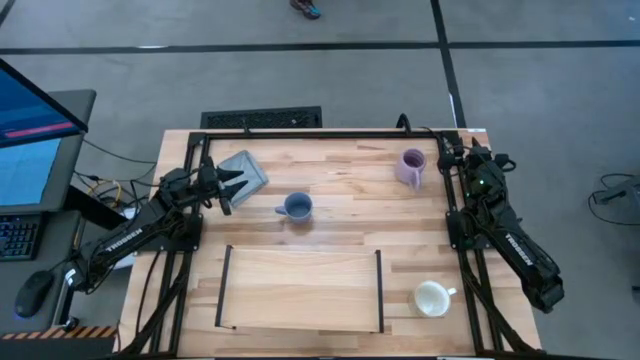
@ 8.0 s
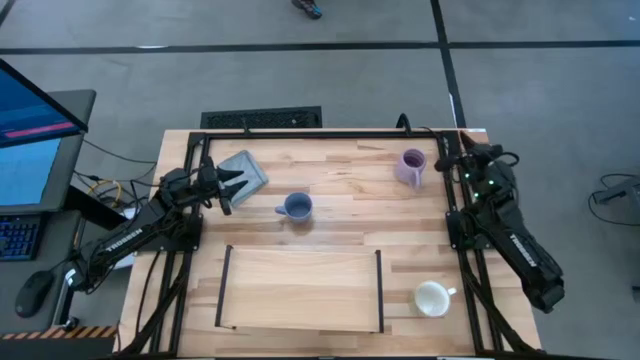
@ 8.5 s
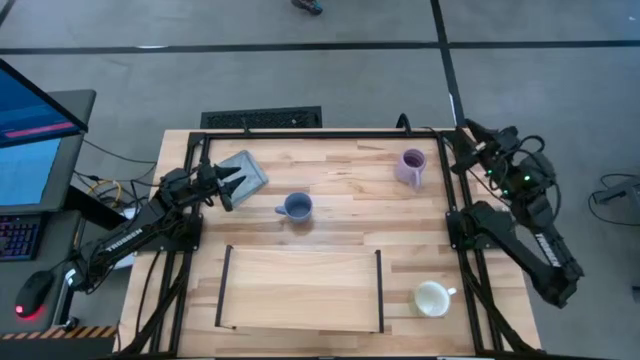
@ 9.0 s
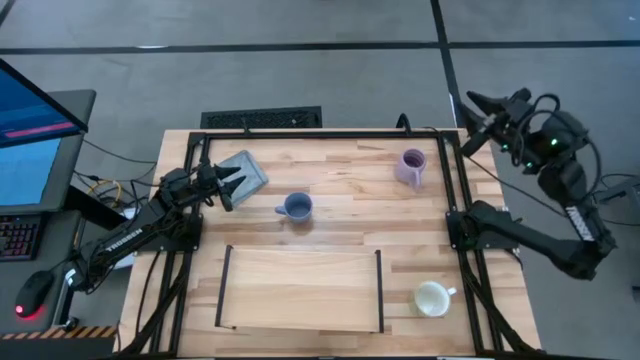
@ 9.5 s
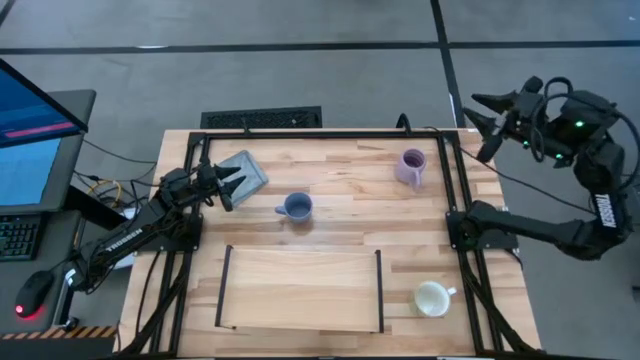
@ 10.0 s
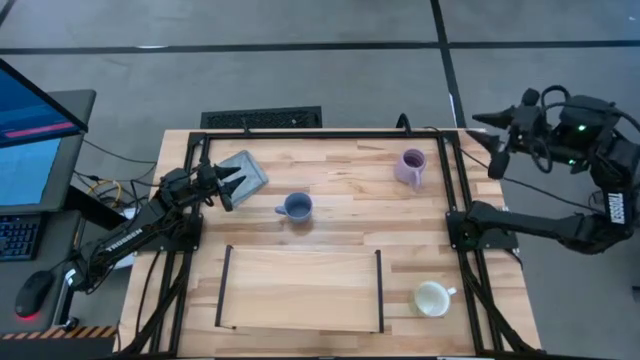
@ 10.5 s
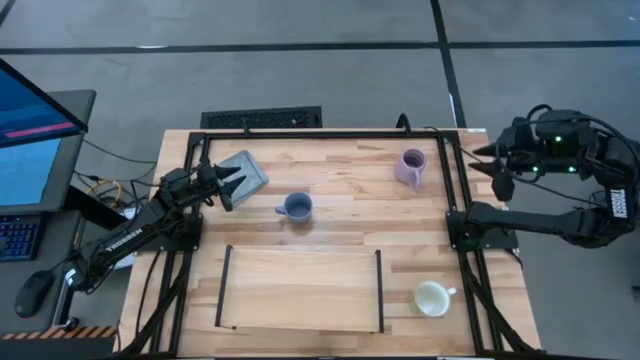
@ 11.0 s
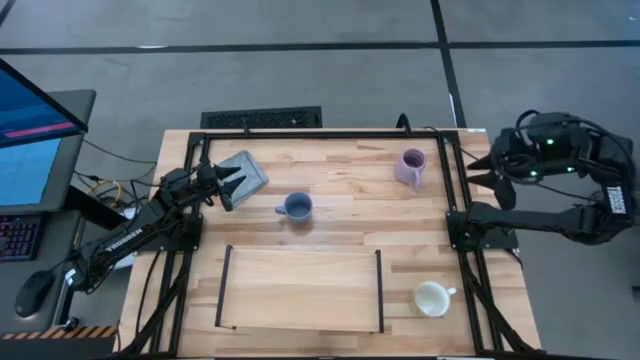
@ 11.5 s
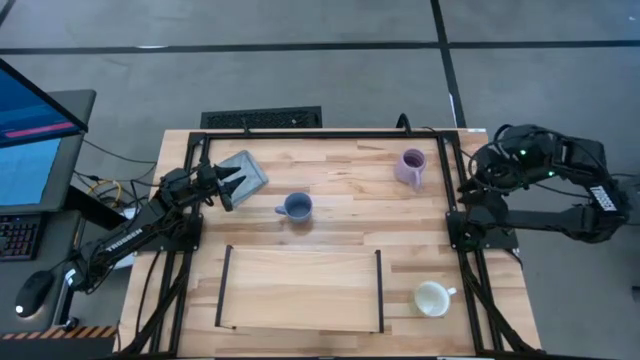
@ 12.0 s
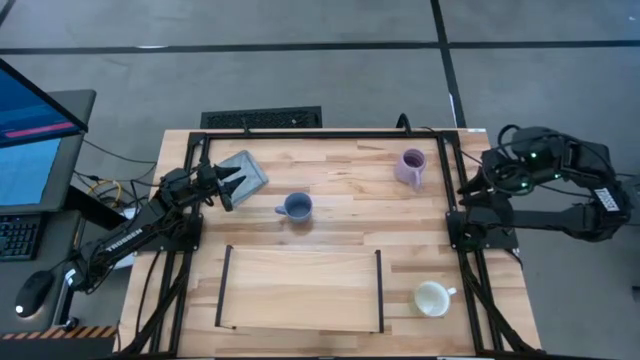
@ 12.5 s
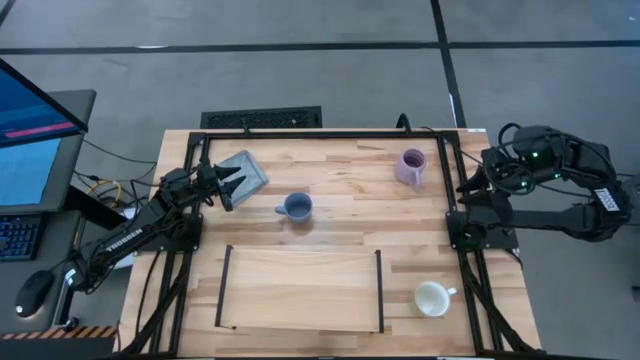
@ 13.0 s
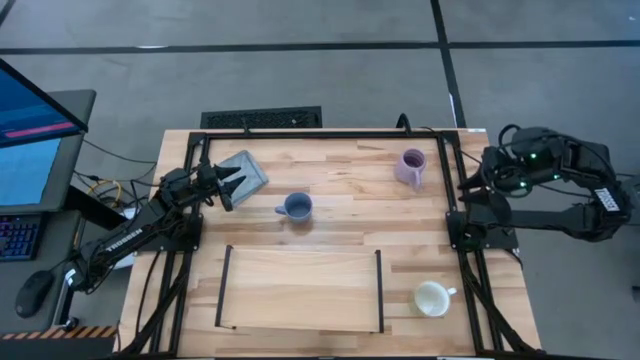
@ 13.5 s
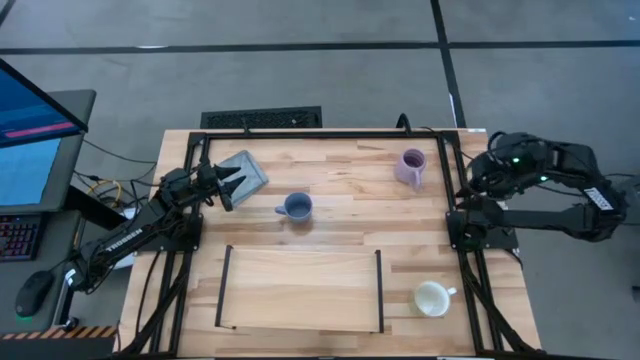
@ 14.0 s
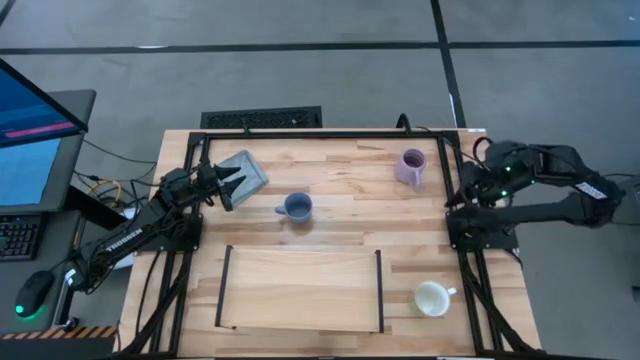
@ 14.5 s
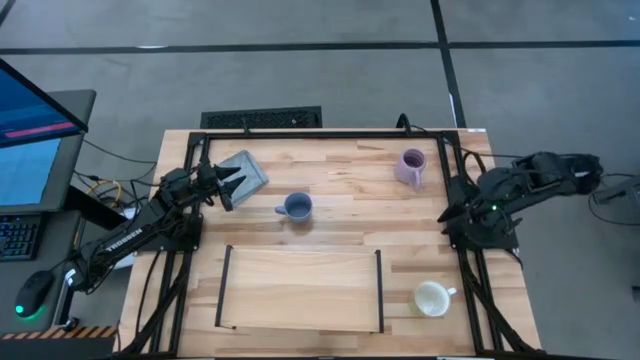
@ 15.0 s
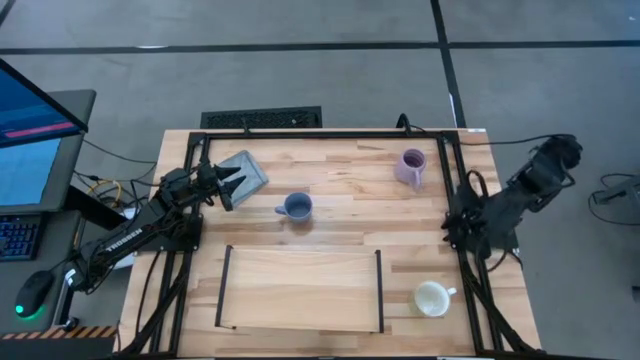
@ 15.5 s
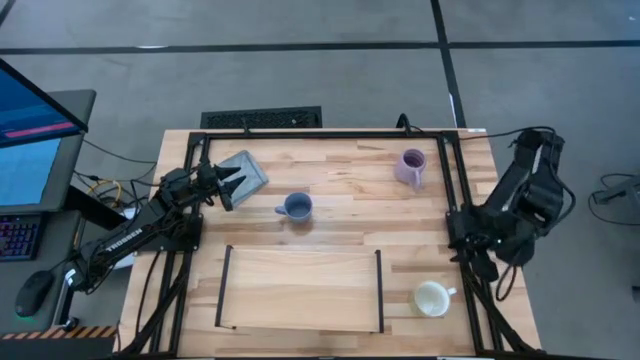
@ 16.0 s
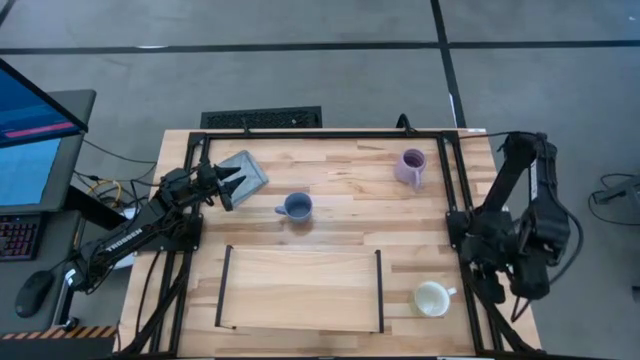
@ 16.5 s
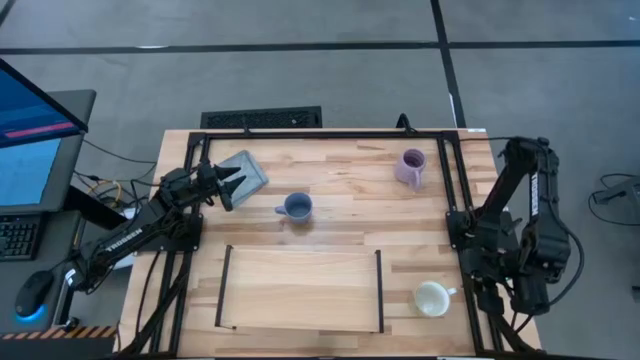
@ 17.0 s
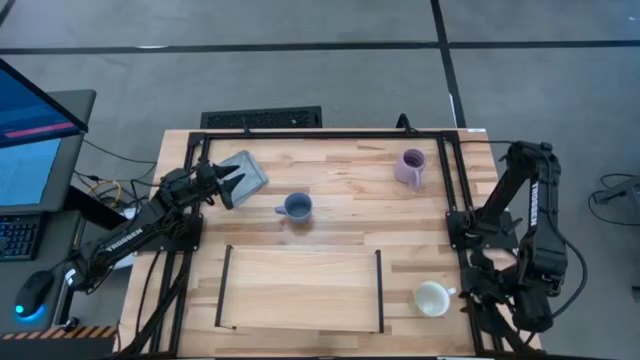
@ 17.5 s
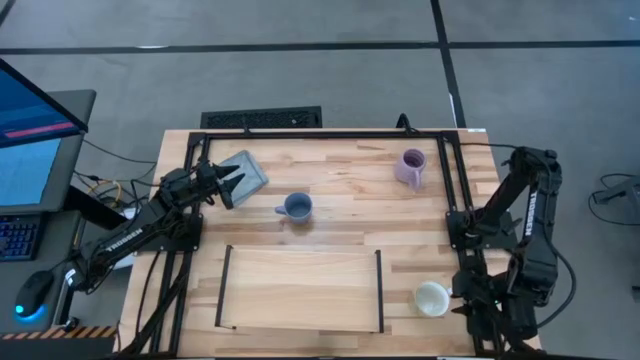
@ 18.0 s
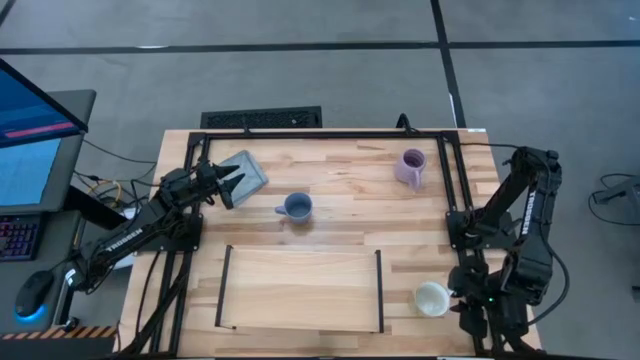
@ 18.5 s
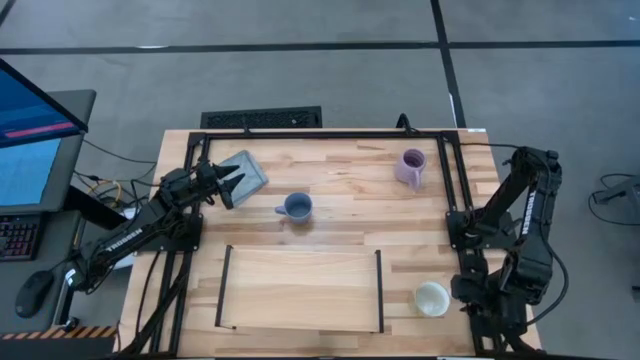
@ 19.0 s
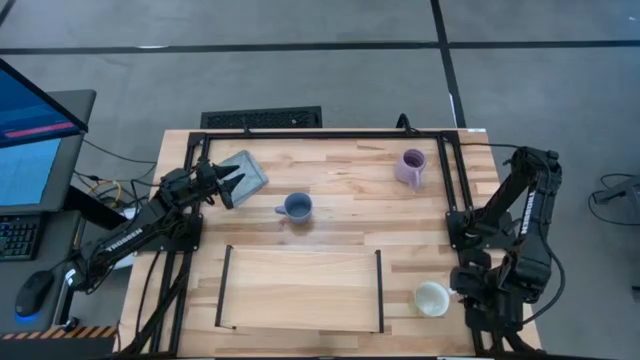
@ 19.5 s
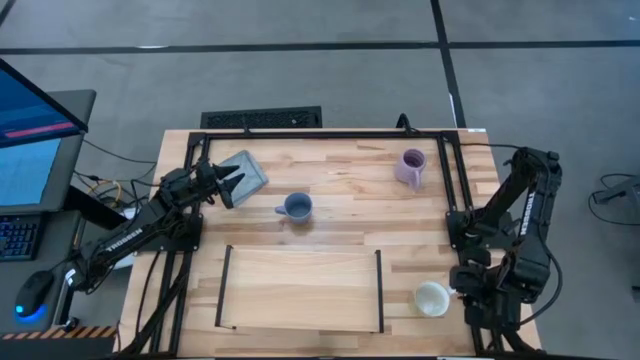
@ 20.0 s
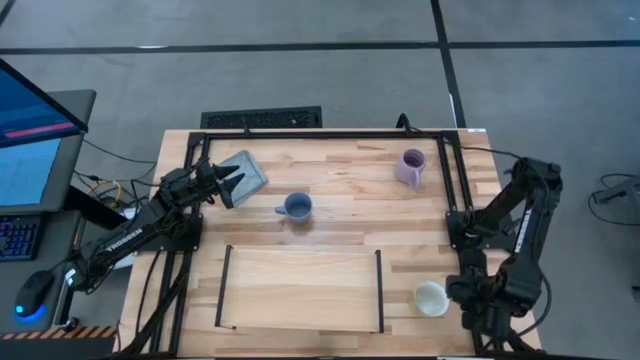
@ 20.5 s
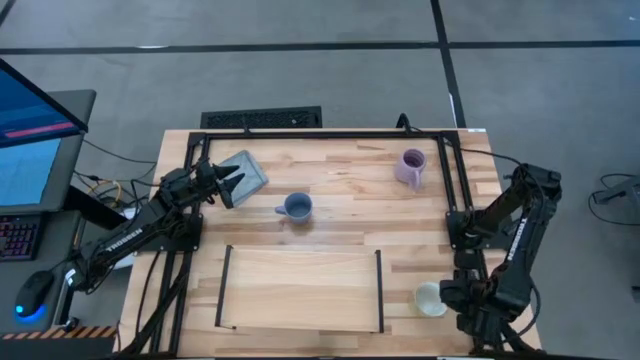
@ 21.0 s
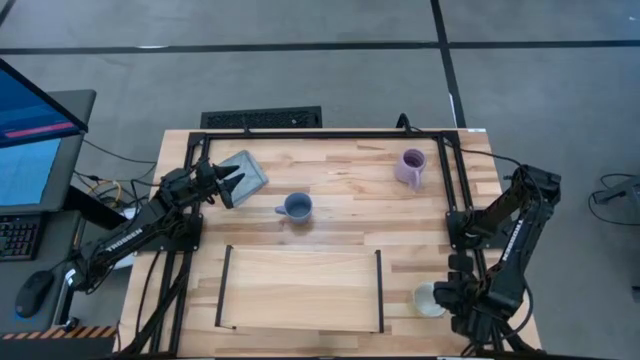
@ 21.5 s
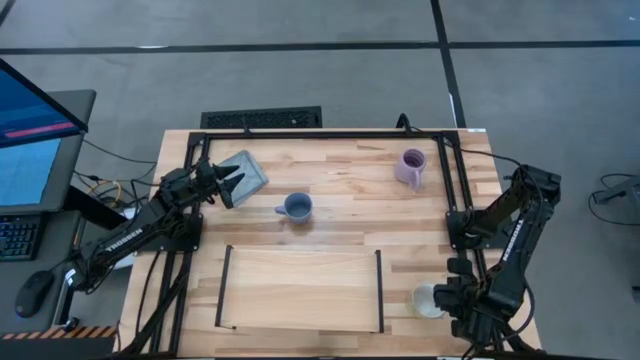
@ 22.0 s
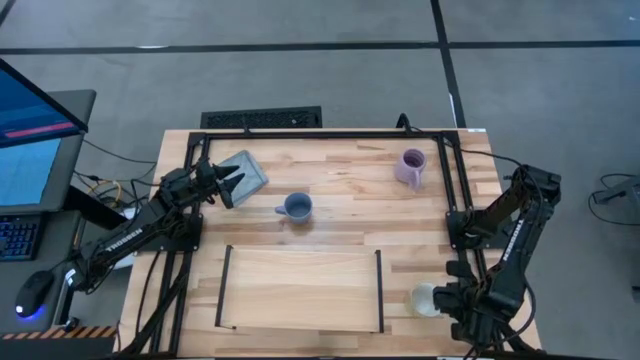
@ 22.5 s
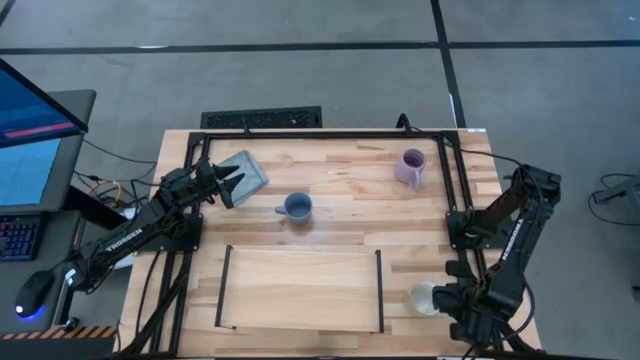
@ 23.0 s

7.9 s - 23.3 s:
Task: Stack small to large cups/mugs on shelf
Put the green mug on the shelf

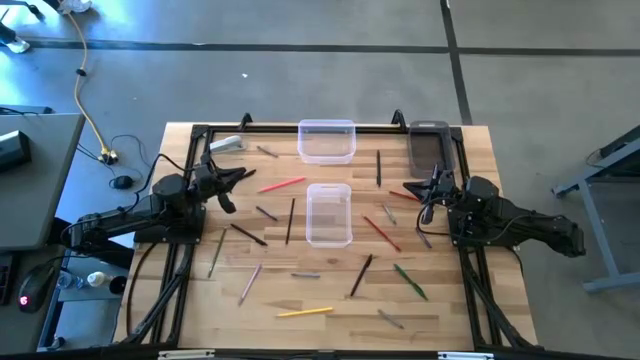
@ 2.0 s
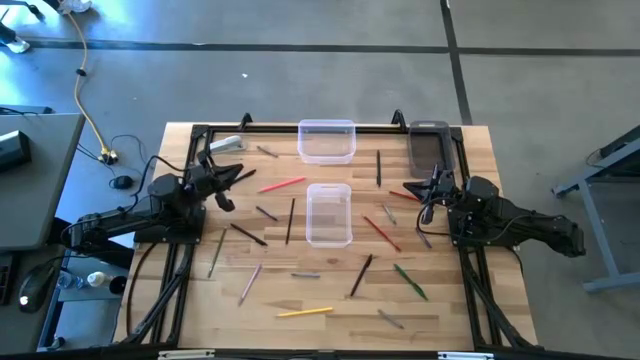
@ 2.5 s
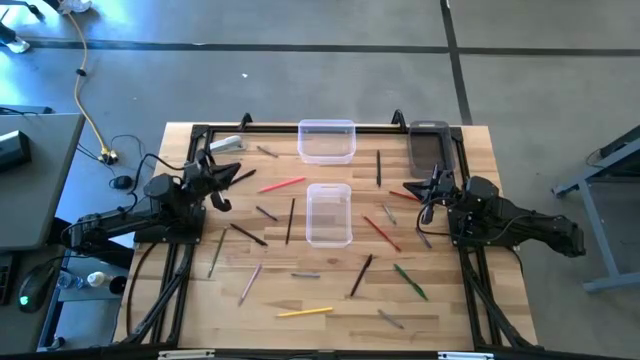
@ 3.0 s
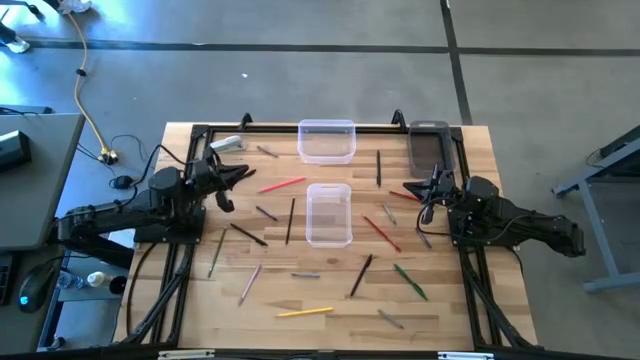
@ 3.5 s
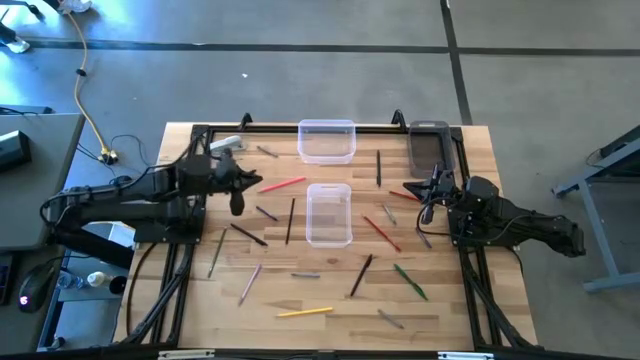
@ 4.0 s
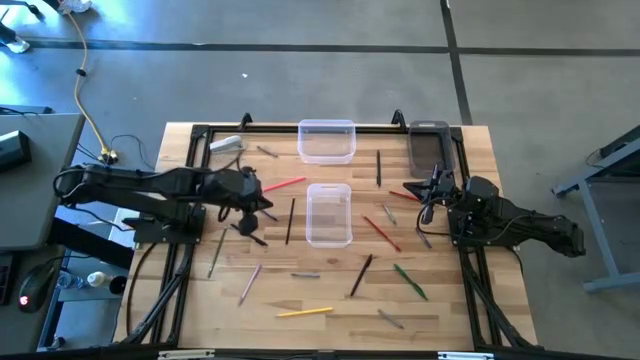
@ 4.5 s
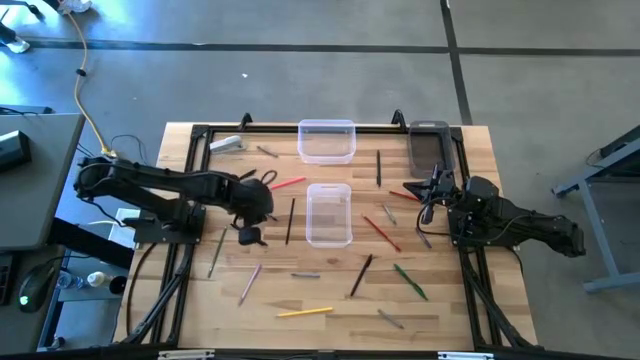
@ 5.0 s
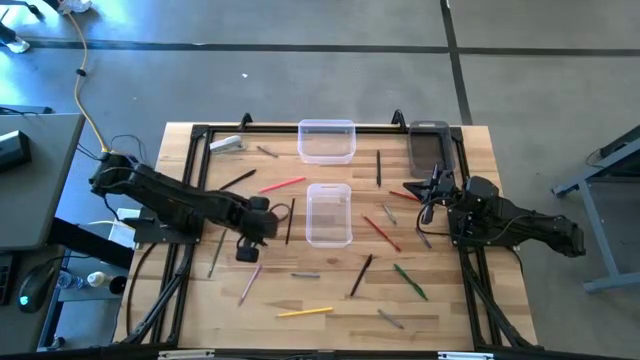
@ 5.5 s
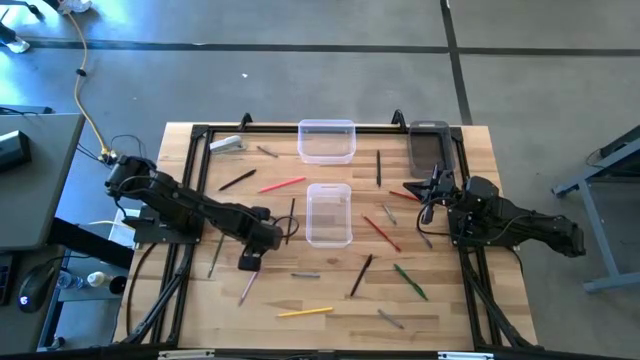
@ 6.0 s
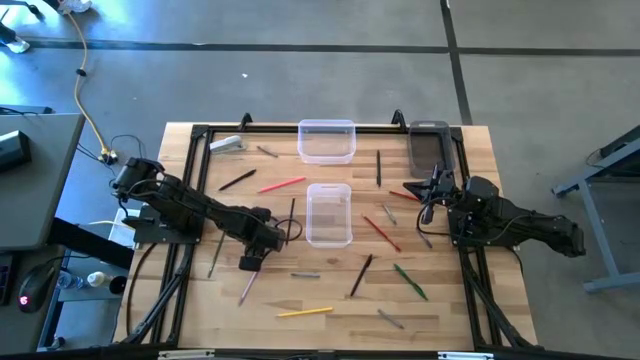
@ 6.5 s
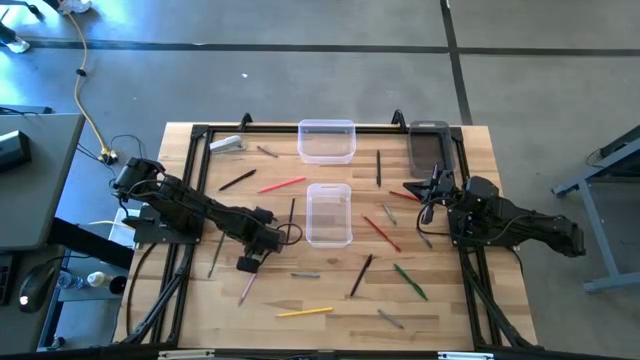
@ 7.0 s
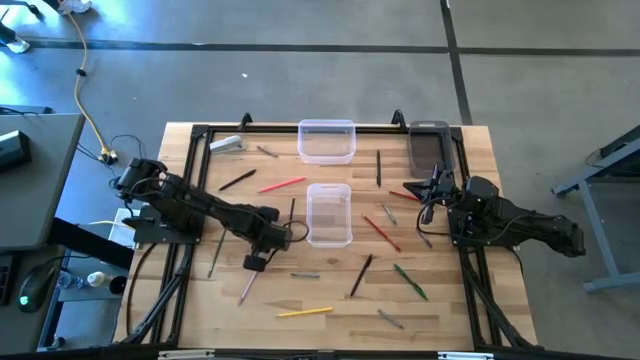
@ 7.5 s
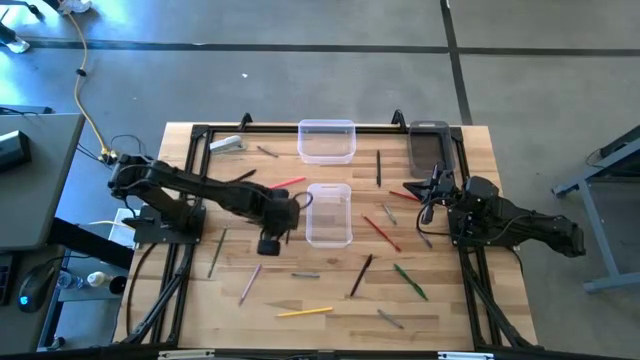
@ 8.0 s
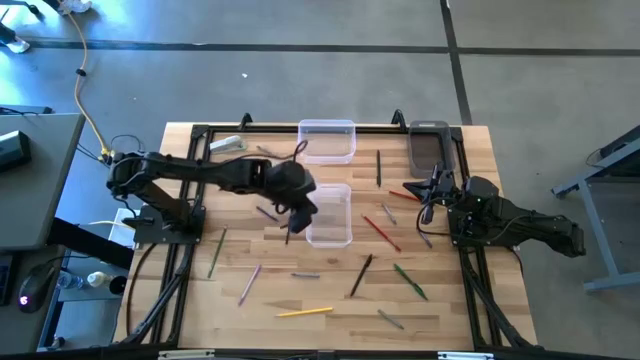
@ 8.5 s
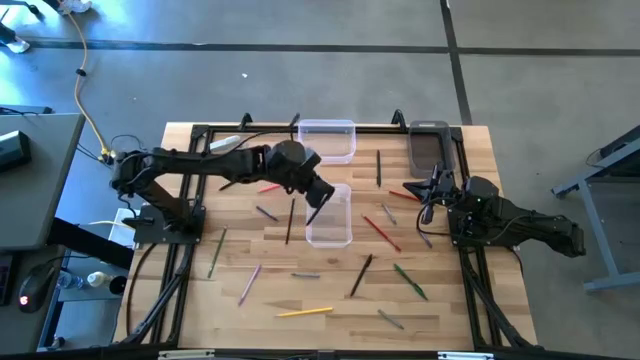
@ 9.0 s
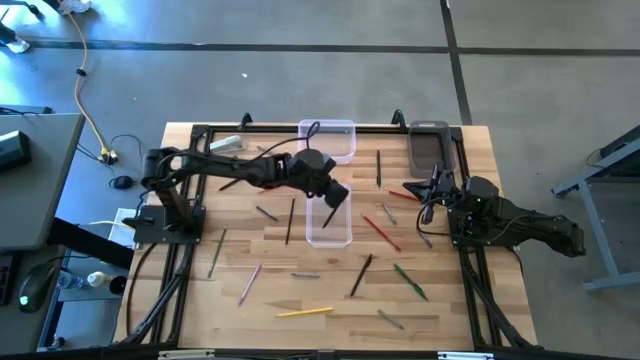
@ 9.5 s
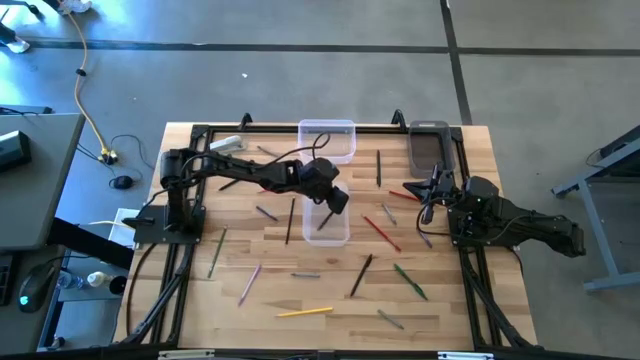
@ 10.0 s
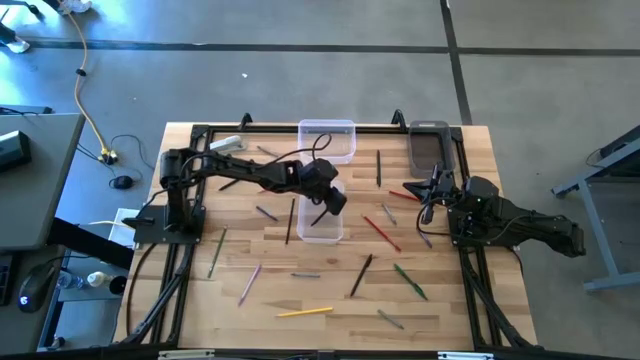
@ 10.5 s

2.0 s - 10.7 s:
Task: Sort crayons/erasers/pens/pencils in bins
Put the bottom left black pen into the bottom transparent bin
